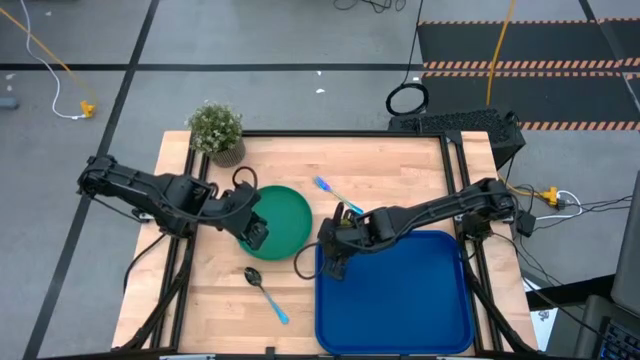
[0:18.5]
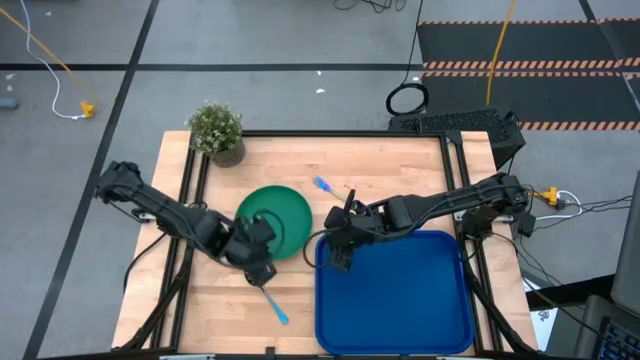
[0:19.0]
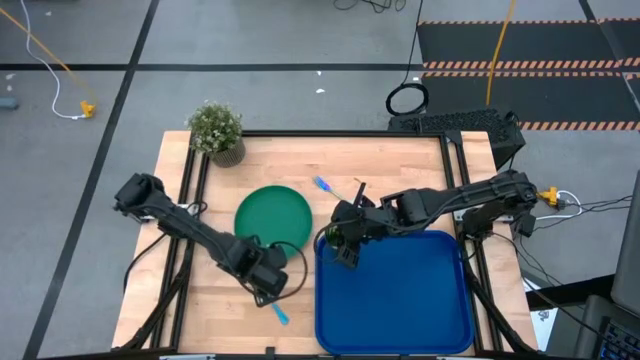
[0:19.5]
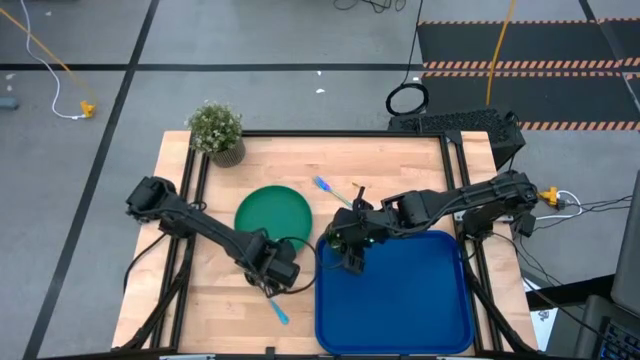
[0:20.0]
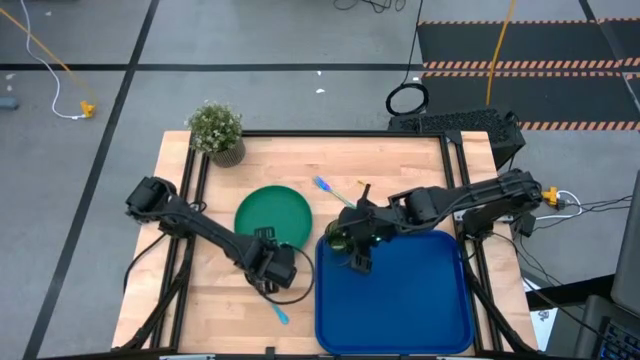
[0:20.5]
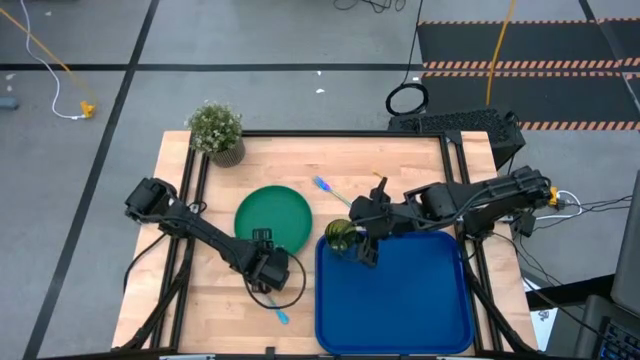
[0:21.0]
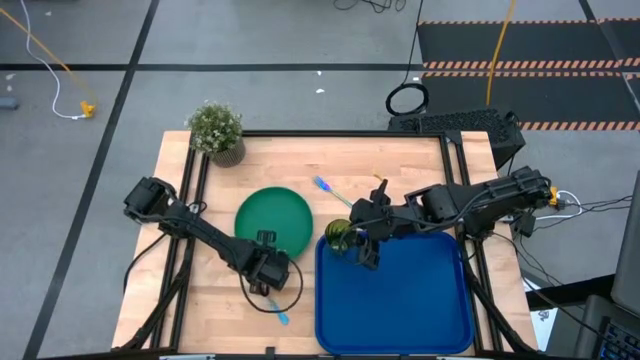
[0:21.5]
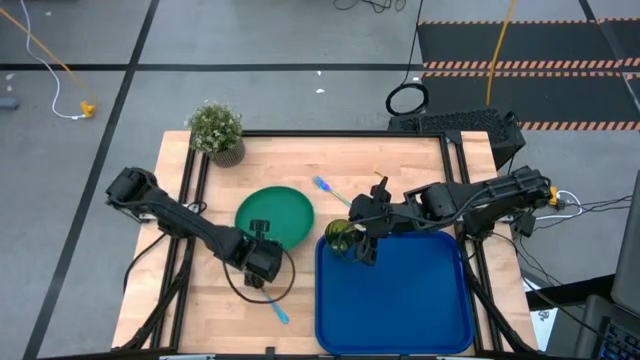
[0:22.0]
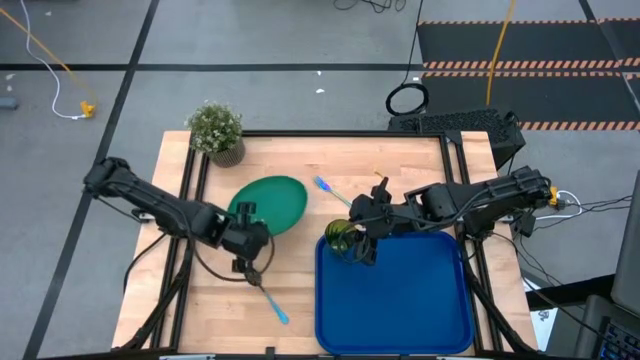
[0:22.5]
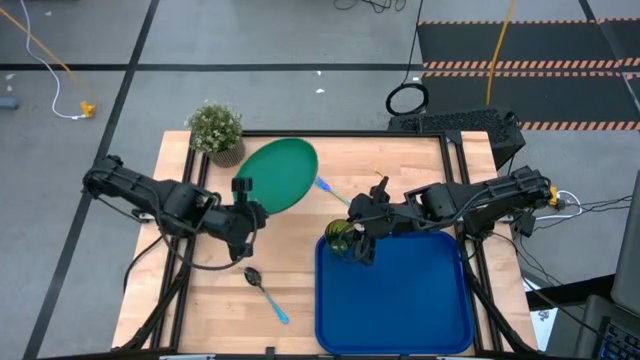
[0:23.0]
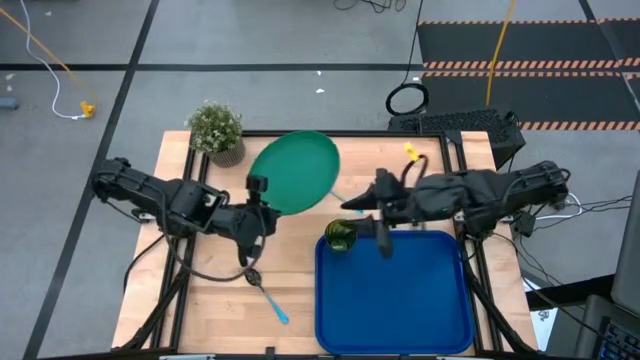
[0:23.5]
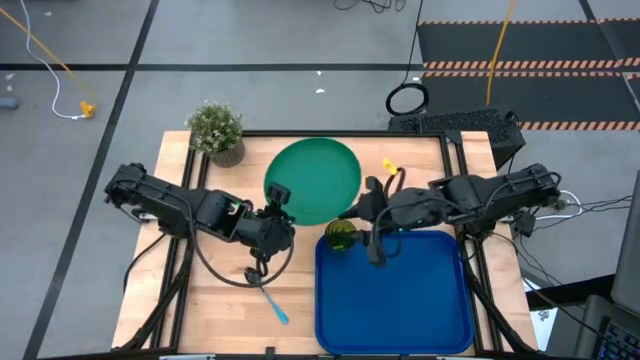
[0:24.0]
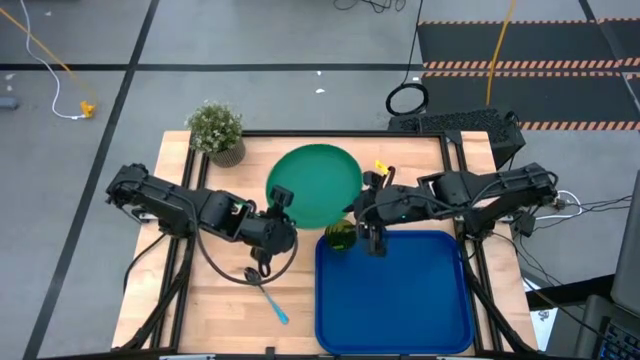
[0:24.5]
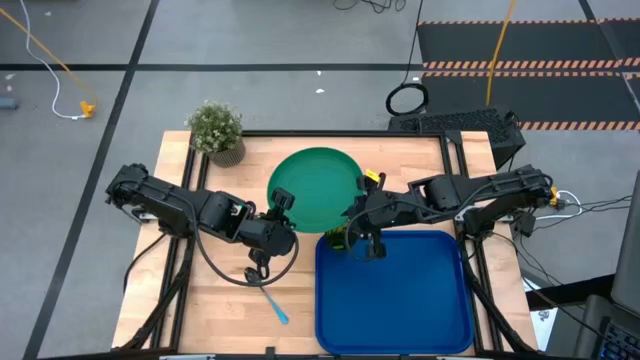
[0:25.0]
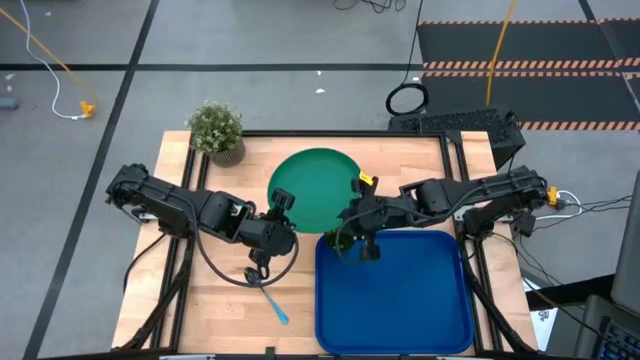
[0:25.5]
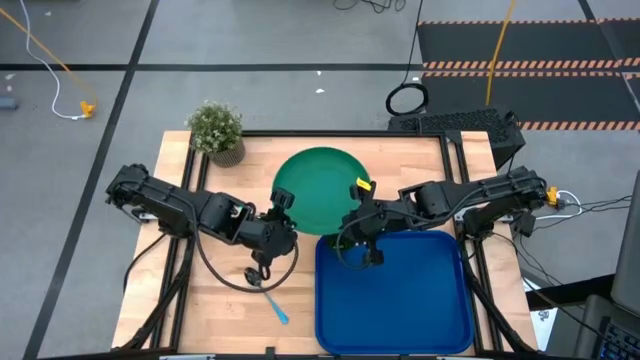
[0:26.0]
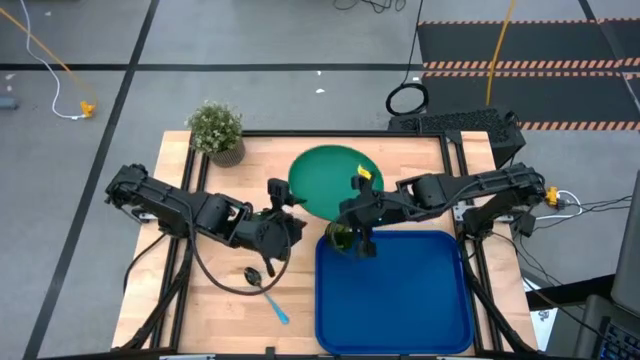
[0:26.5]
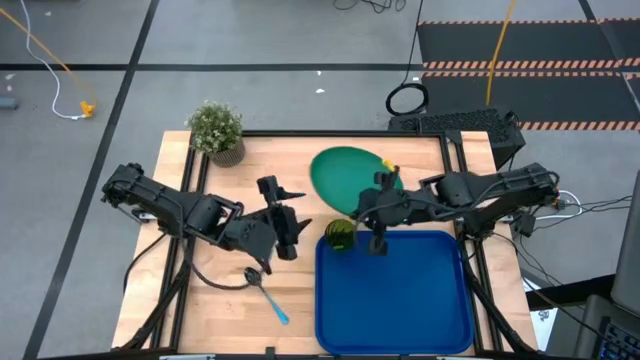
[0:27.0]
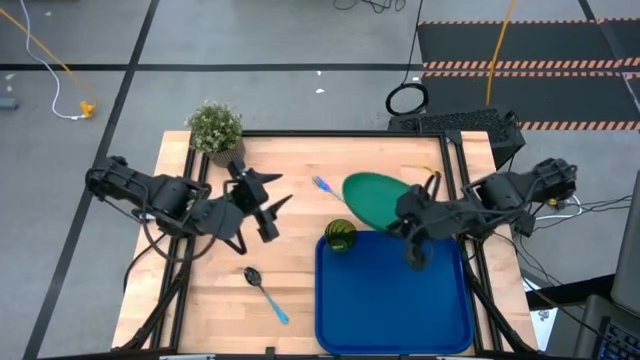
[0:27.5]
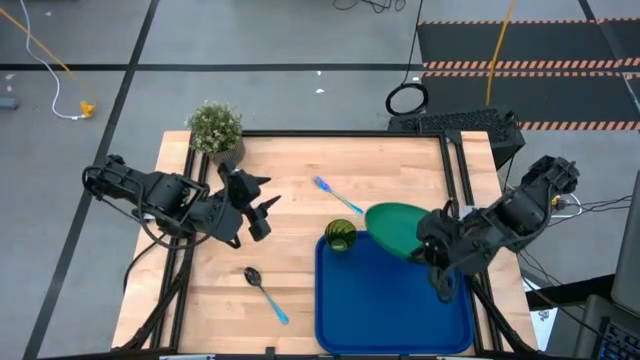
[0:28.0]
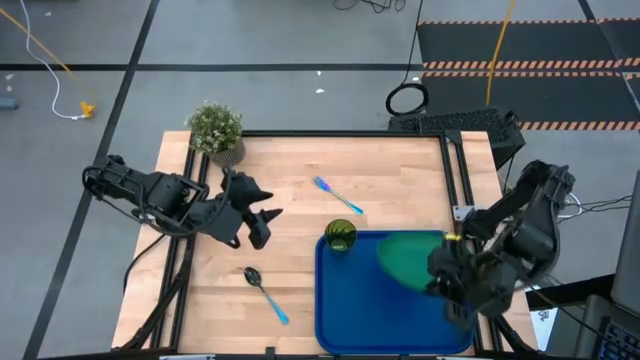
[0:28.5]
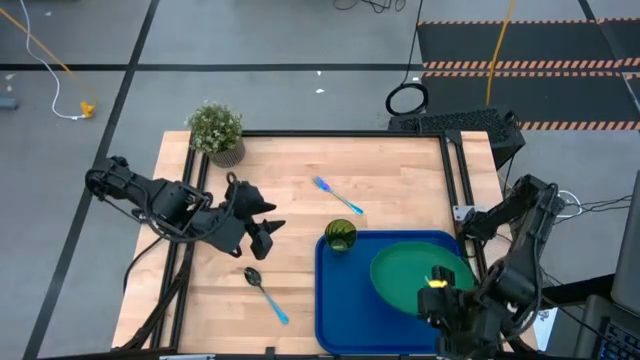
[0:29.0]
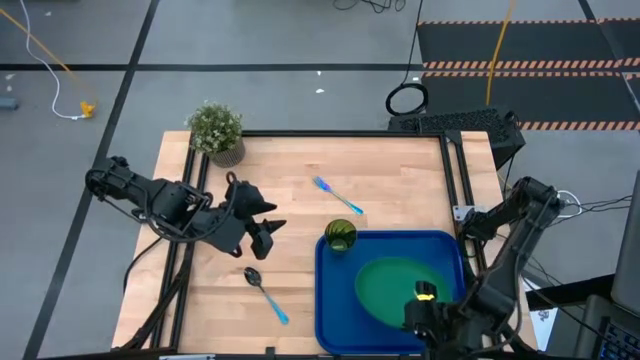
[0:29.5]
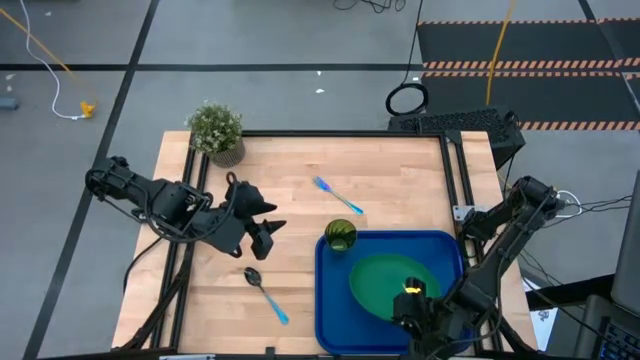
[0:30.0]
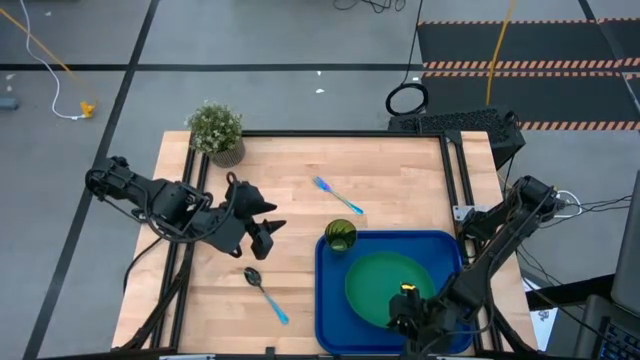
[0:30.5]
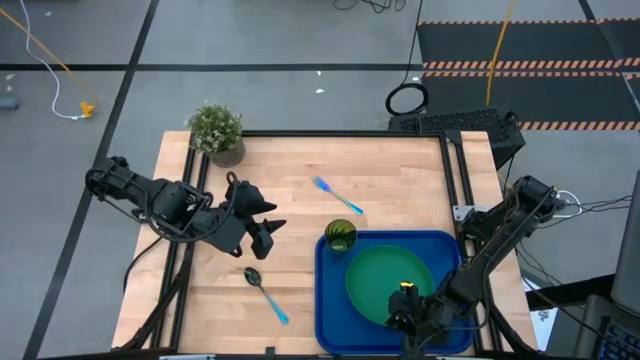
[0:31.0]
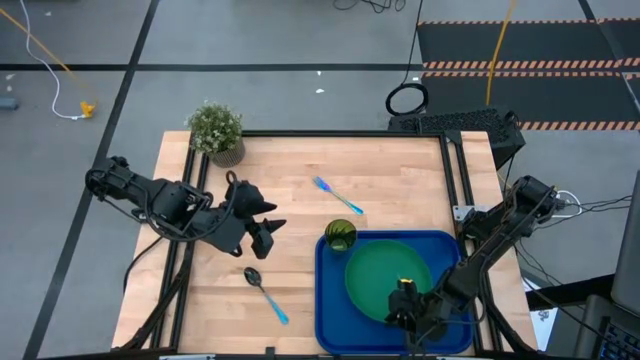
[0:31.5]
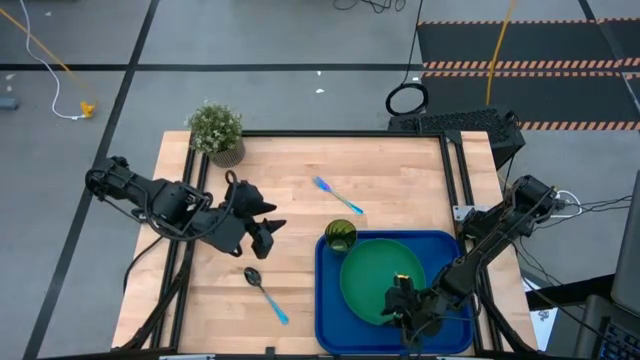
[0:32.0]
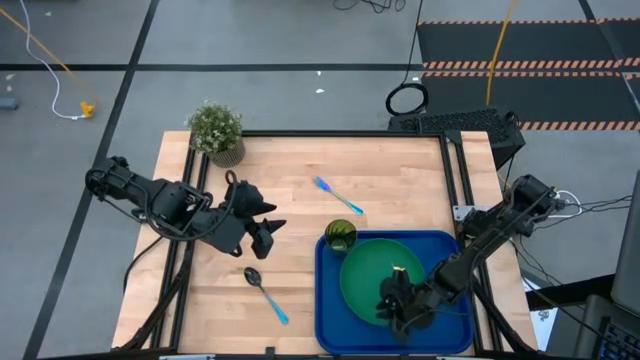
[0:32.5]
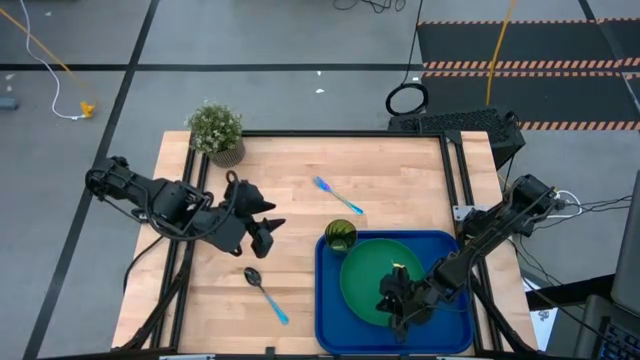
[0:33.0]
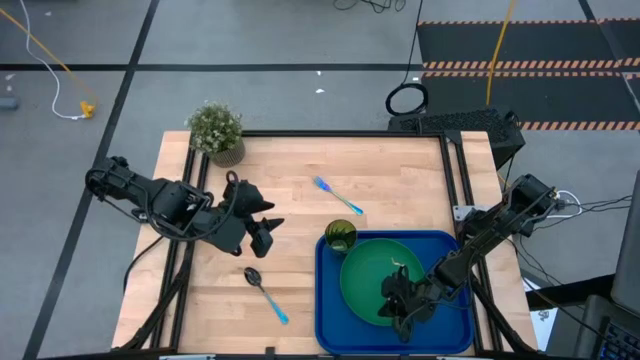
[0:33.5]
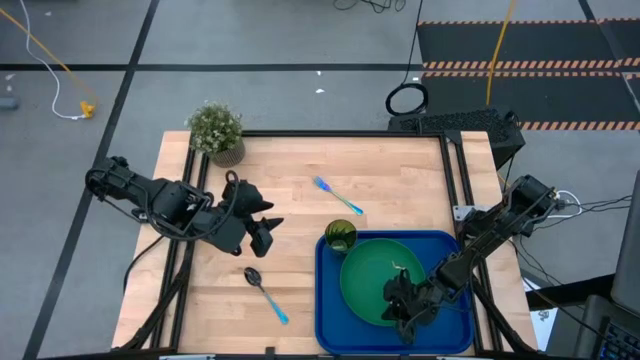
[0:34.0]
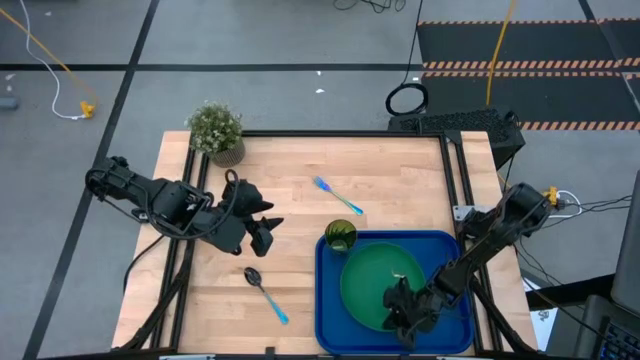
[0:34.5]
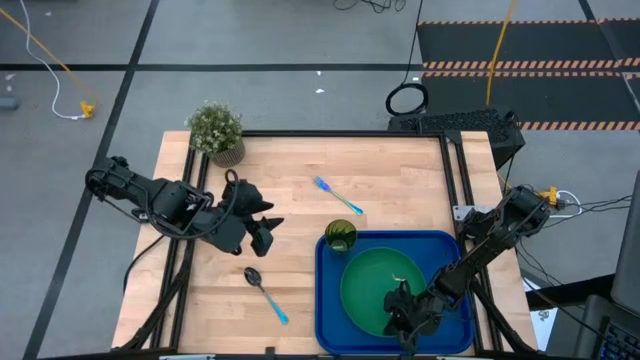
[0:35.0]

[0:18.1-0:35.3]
Task: Pick and place plate/cup/fork/spoon on tray
Put the green plate on the blue tray to the bottom left of the green cup

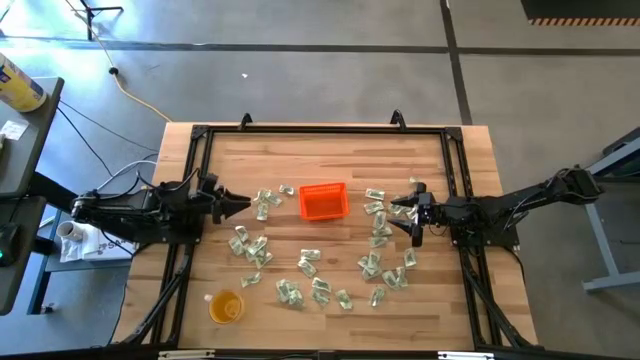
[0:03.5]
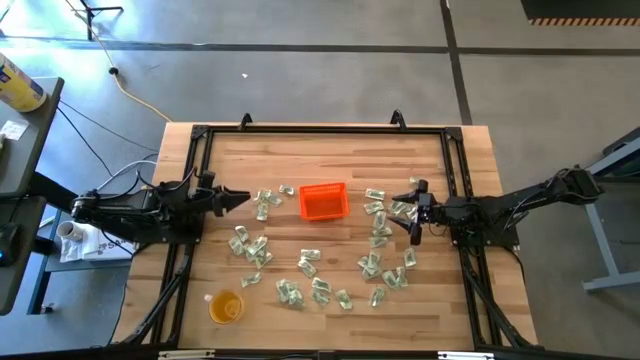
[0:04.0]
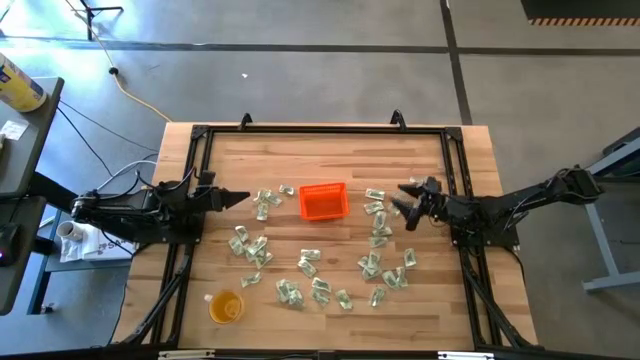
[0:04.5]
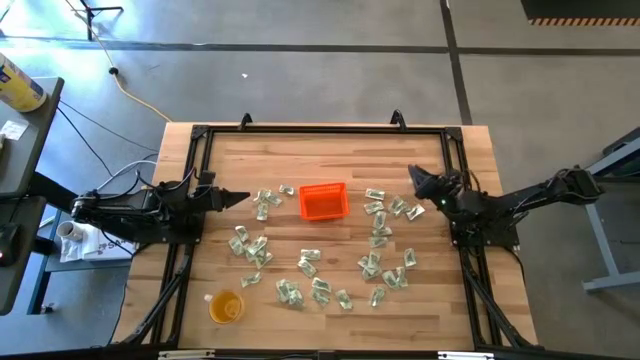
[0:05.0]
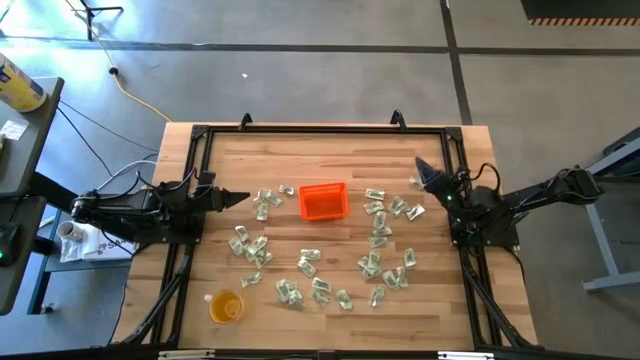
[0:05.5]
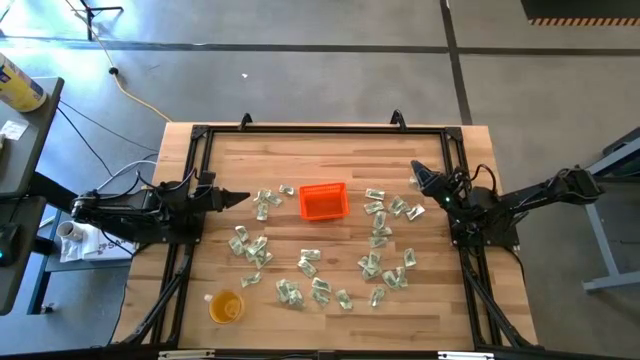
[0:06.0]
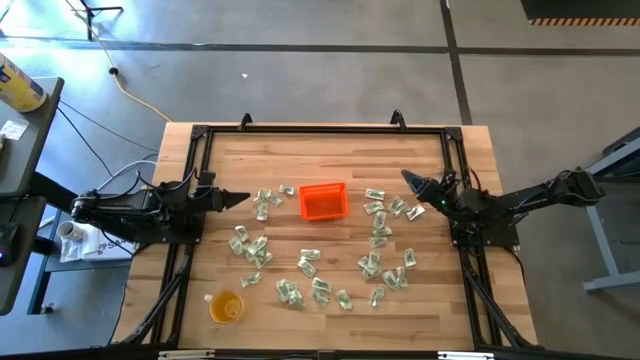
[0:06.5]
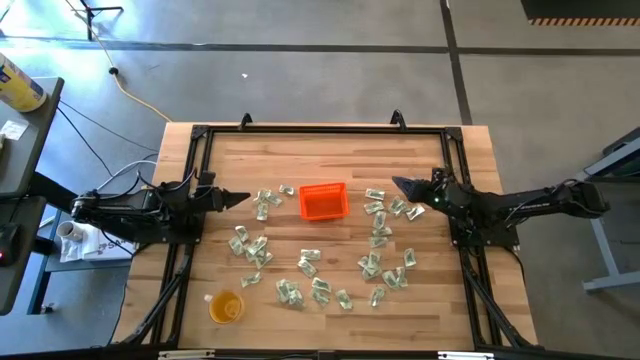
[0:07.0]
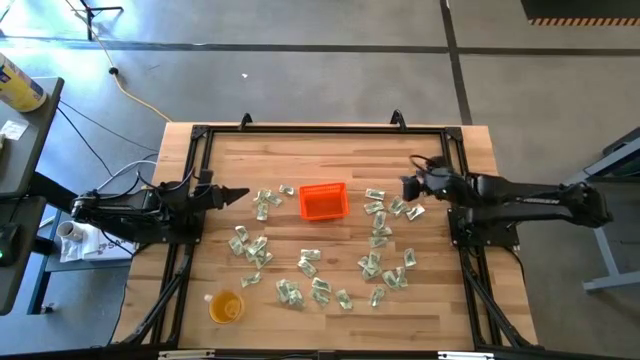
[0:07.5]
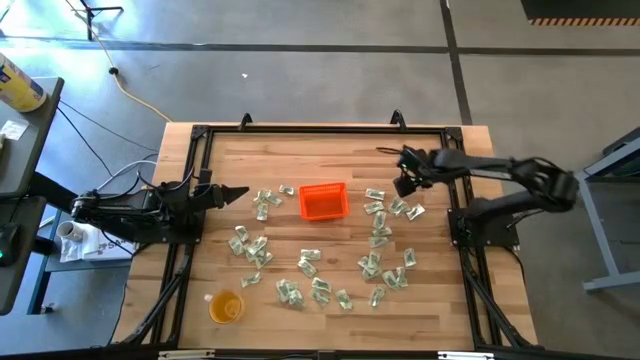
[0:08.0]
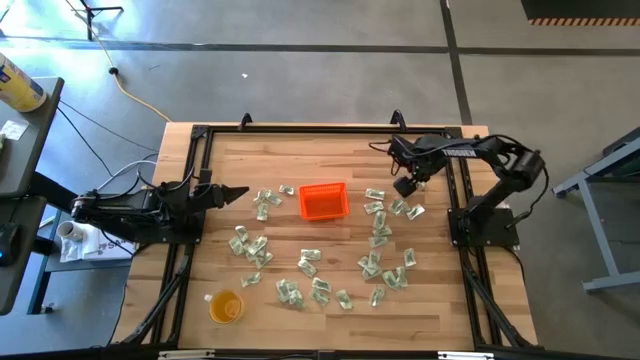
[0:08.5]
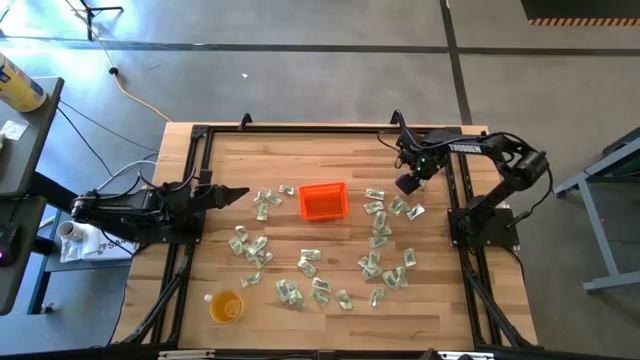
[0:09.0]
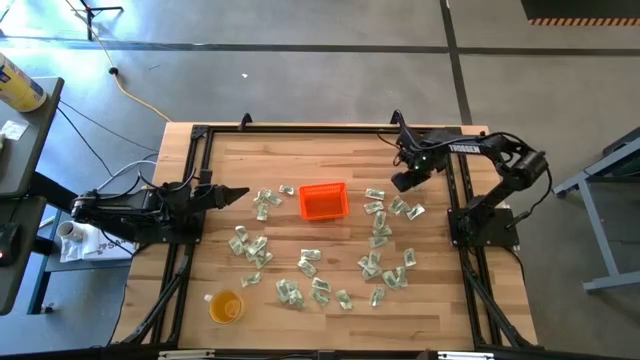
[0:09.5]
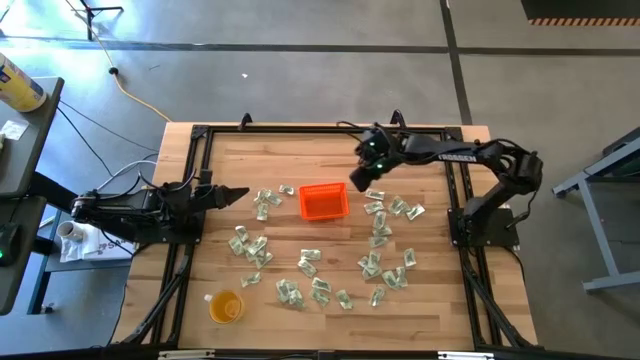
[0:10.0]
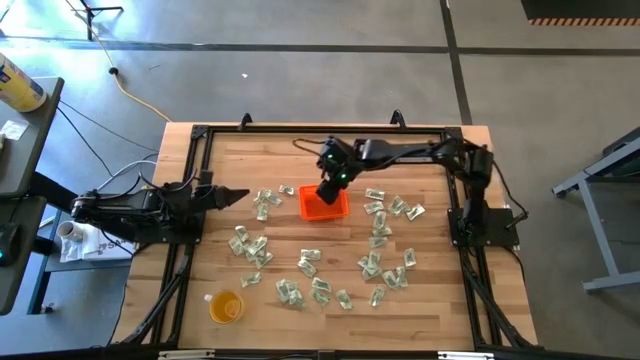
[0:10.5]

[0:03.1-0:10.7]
Task: Pick and place Stevia / Truvia into bins
Put the stevia packet into the basket
